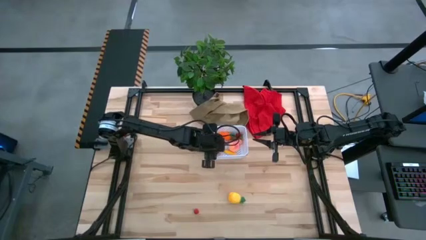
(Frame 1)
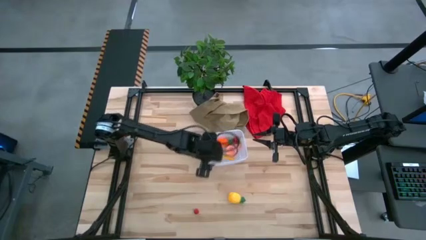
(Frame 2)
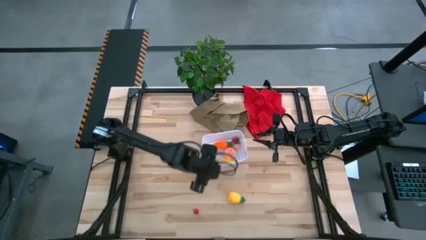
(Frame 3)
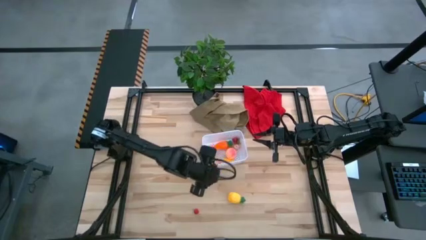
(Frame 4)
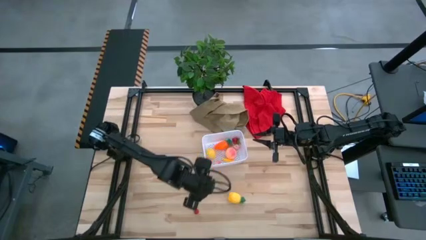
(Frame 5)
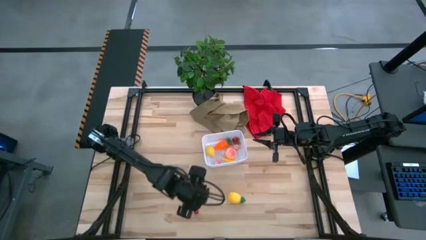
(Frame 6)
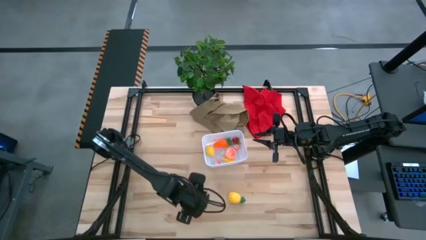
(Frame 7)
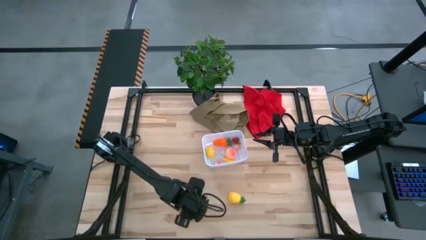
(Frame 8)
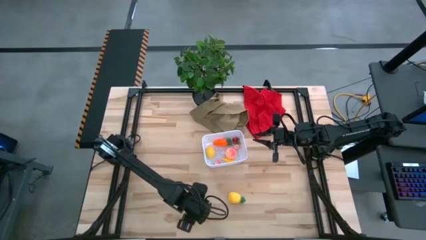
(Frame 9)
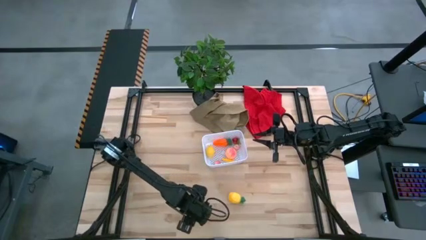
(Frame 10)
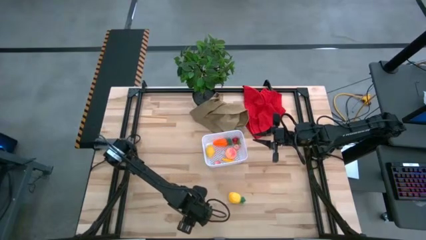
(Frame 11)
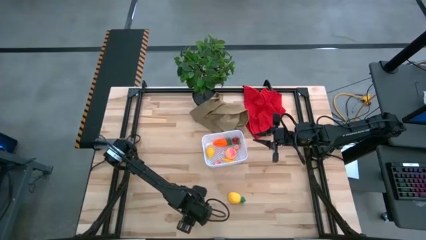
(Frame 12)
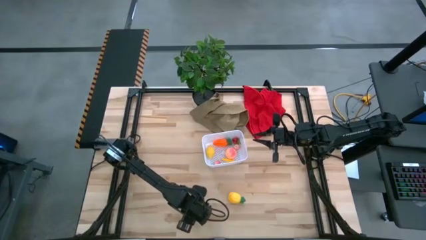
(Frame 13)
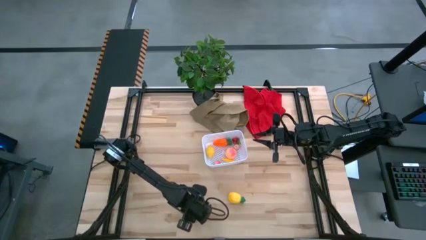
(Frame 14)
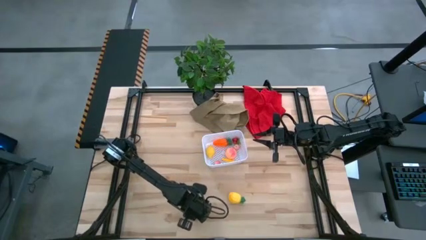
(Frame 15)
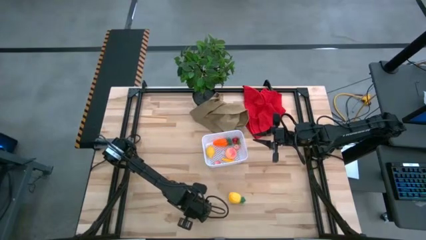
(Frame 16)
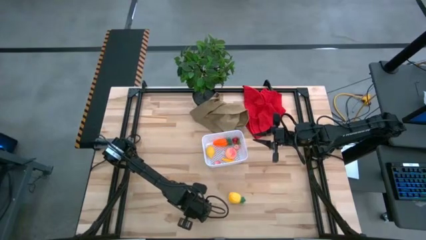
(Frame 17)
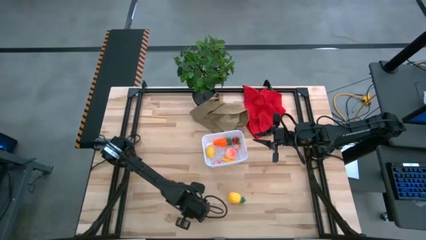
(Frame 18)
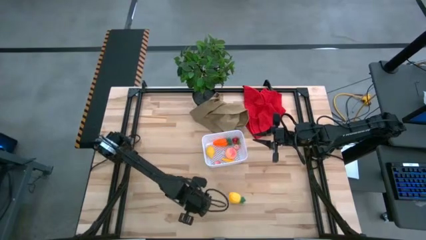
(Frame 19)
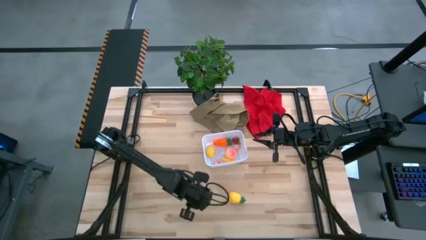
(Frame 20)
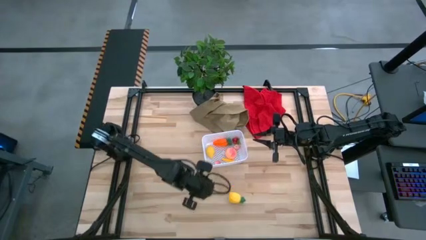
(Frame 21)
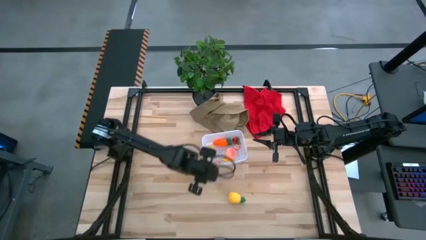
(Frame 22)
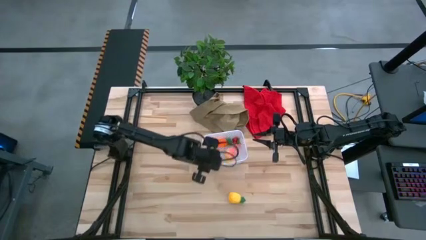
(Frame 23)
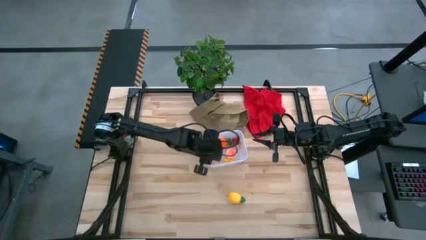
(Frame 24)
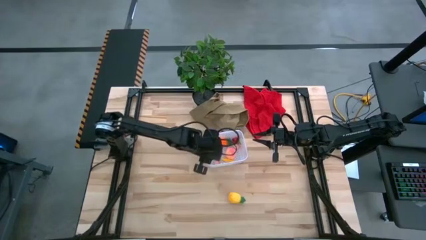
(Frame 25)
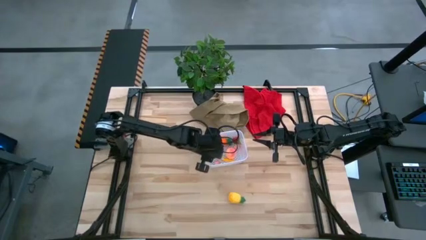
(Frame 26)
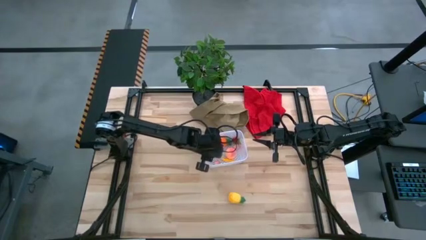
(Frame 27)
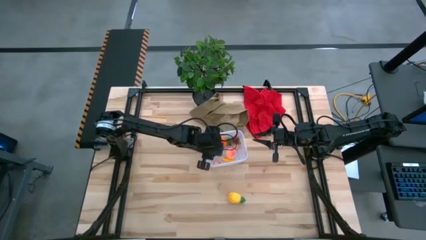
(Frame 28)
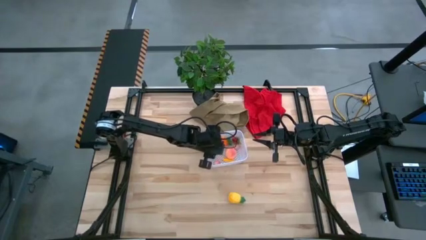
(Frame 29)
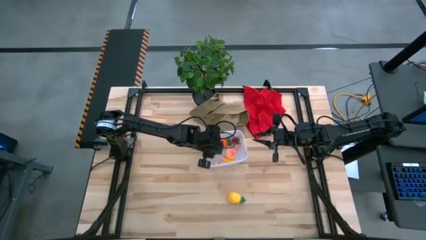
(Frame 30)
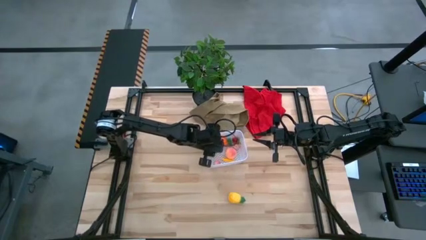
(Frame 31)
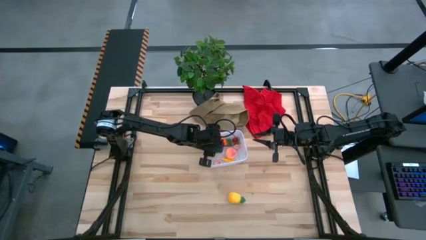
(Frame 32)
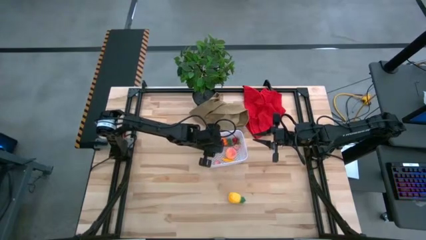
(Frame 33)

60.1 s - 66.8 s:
Task: Pick and placing Produce into tupperware
Put the raspberry into the bin

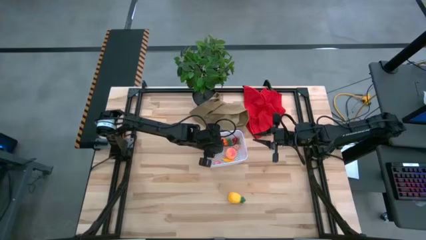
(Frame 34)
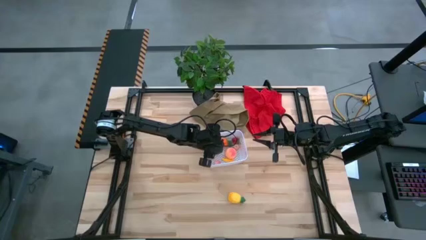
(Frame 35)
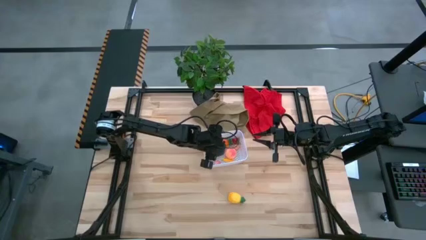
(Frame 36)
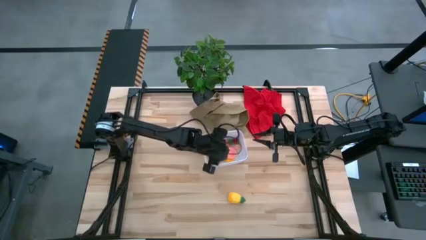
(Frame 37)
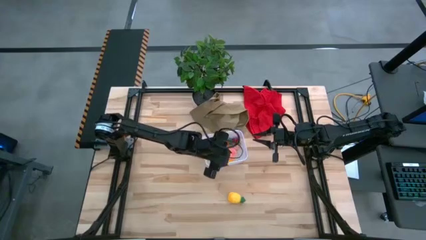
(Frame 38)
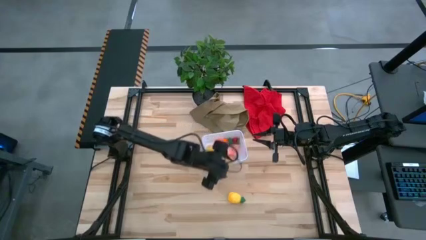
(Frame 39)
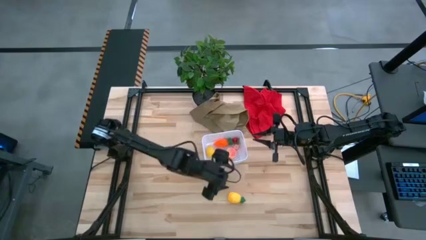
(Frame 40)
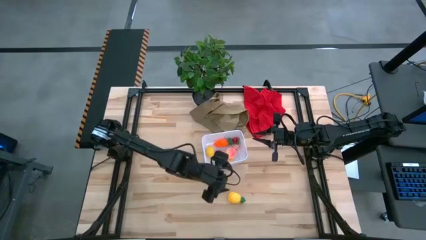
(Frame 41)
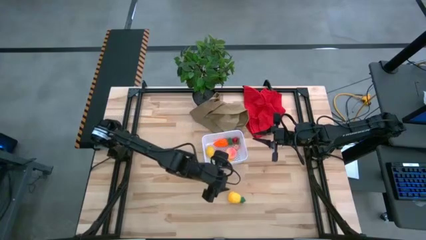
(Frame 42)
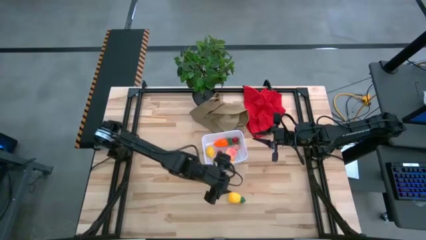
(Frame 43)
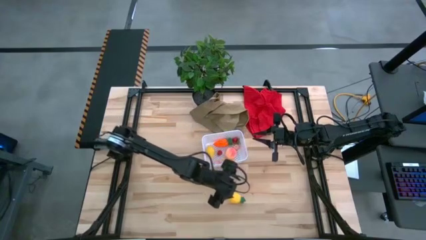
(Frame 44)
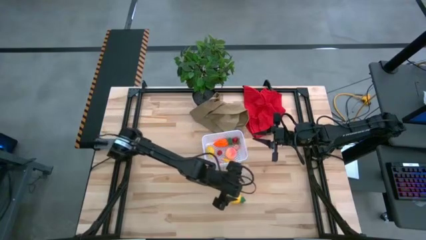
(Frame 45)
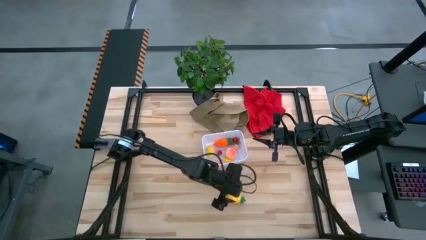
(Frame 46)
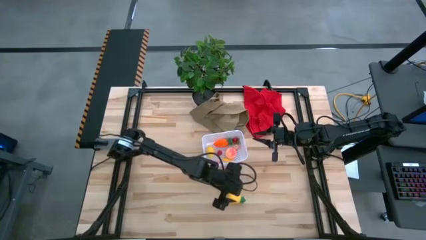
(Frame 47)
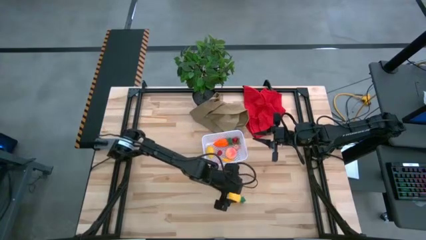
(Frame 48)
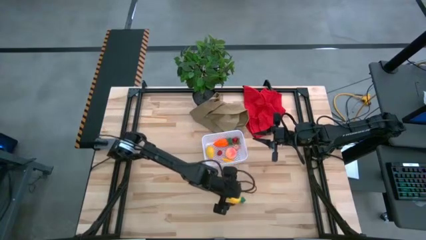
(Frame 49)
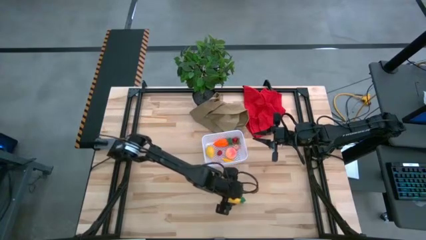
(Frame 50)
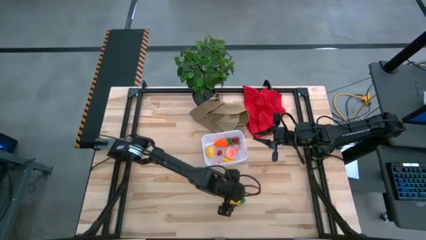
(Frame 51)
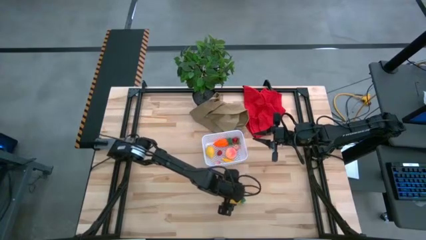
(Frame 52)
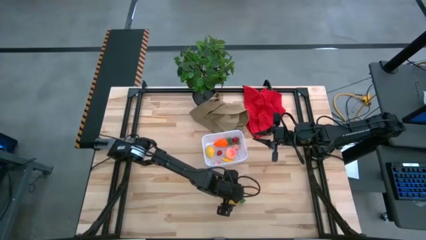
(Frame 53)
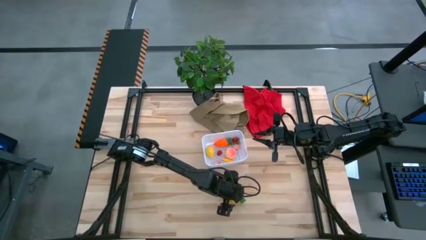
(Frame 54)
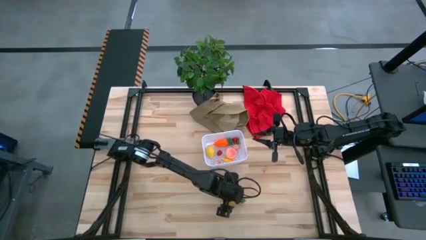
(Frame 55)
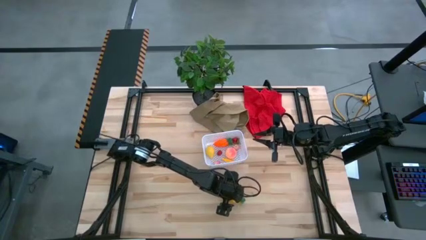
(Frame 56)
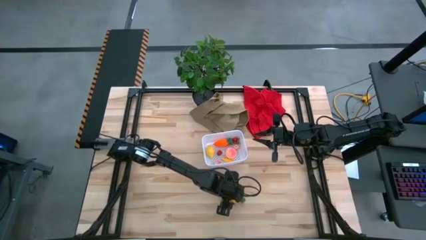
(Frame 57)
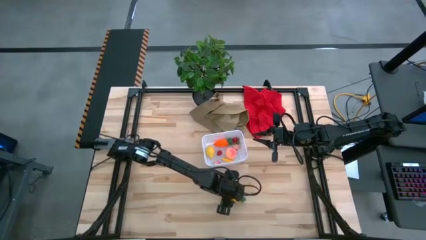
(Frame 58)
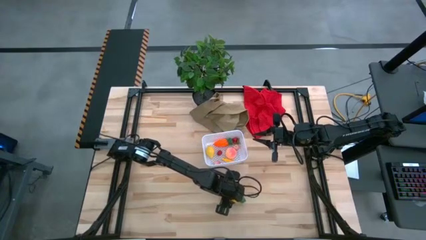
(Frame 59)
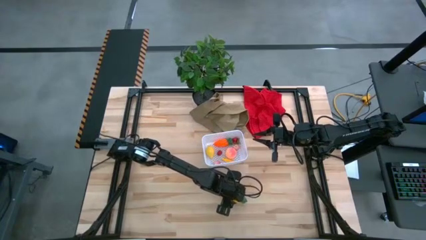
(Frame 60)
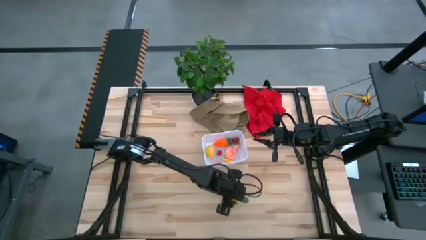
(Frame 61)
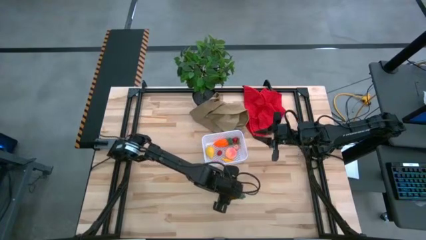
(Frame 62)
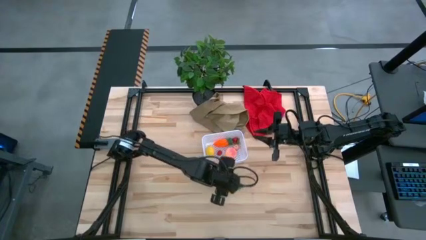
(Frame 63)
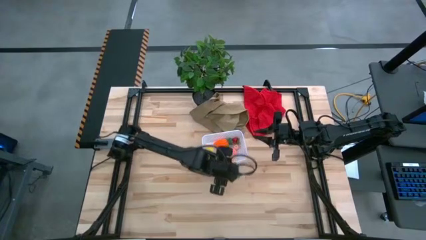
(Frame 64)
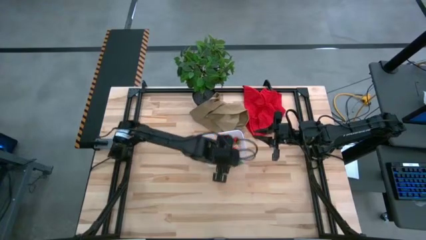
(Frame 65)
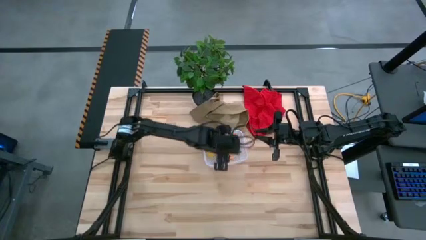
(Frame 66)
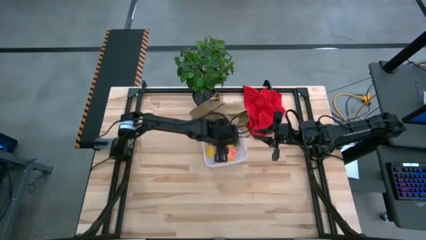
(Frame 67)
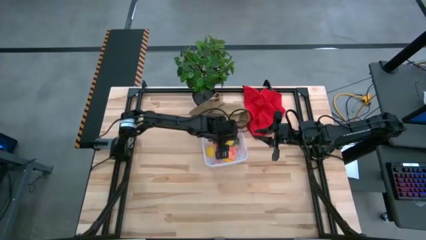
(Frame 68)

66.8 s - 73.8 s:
Put the pineapple into the bin

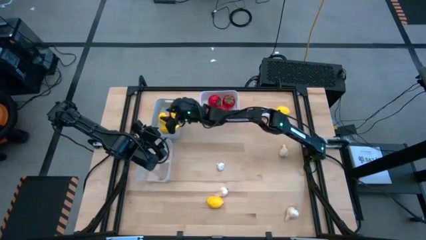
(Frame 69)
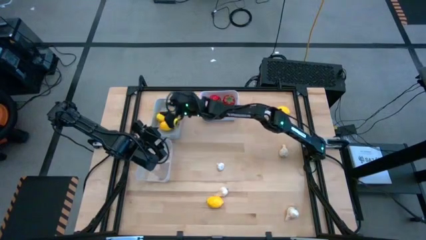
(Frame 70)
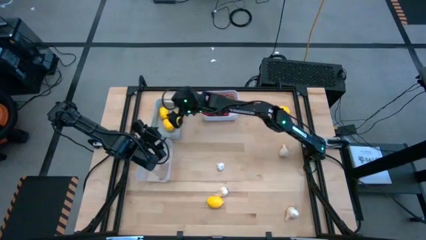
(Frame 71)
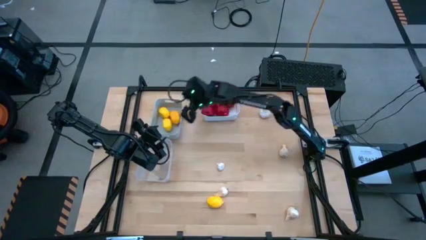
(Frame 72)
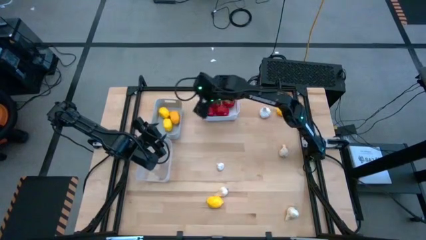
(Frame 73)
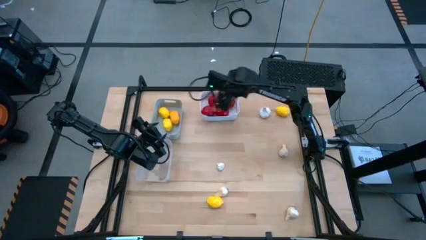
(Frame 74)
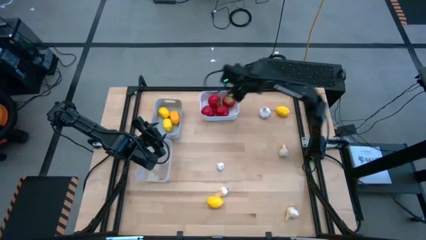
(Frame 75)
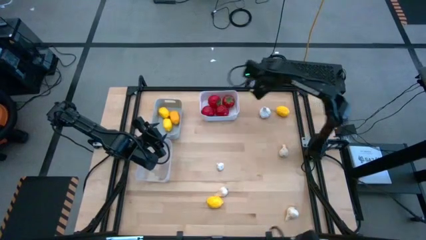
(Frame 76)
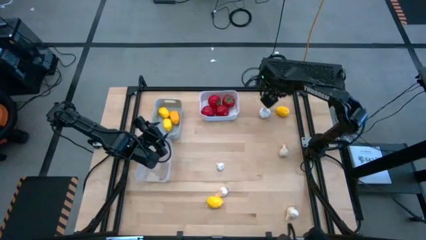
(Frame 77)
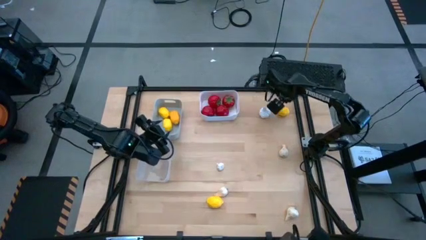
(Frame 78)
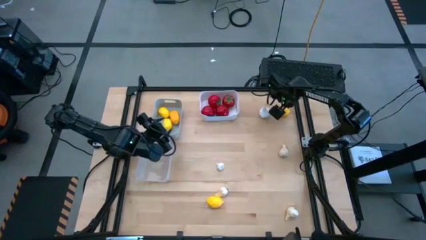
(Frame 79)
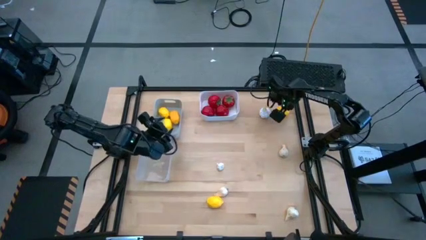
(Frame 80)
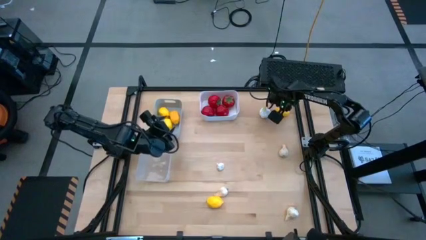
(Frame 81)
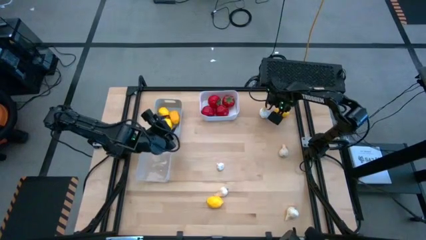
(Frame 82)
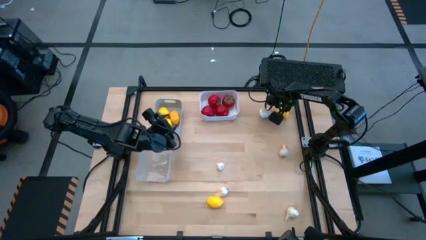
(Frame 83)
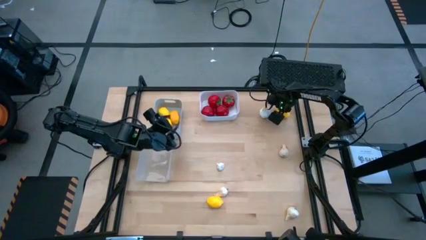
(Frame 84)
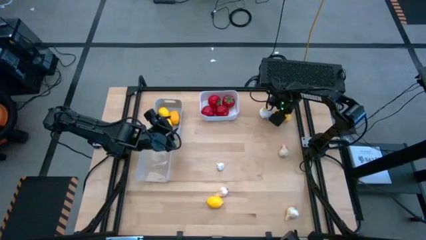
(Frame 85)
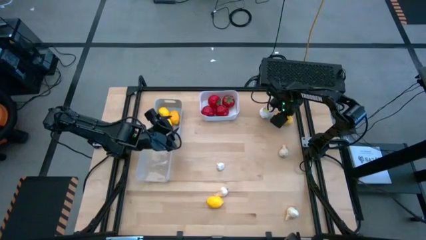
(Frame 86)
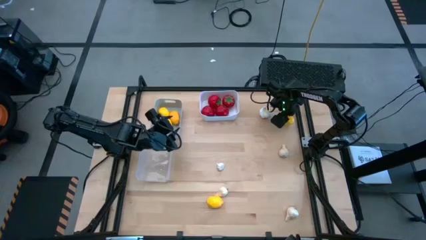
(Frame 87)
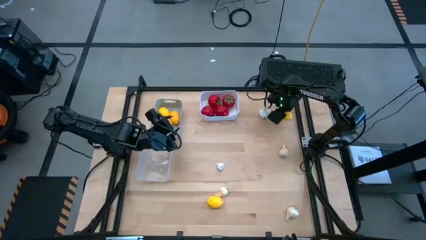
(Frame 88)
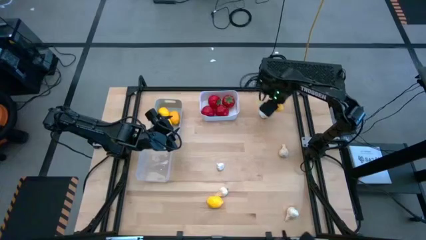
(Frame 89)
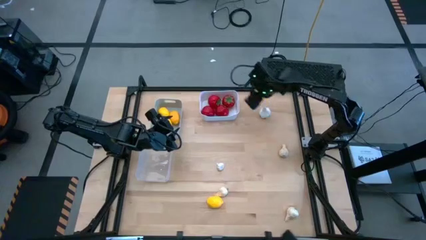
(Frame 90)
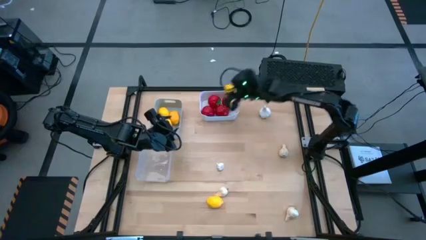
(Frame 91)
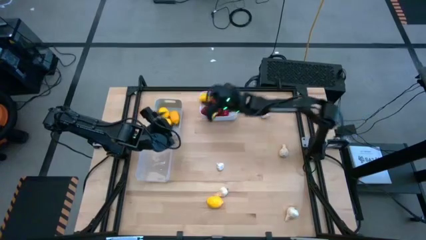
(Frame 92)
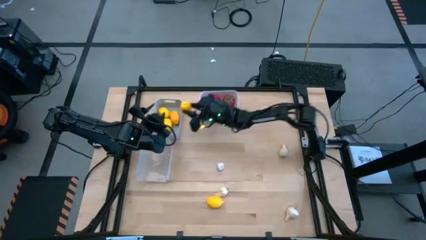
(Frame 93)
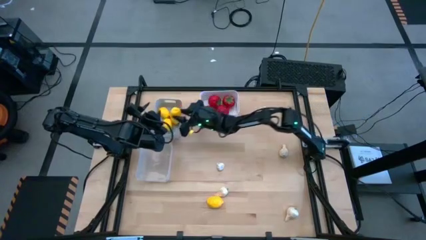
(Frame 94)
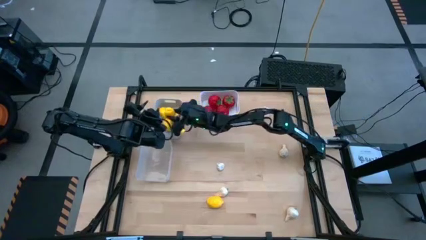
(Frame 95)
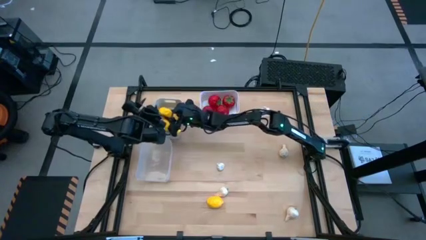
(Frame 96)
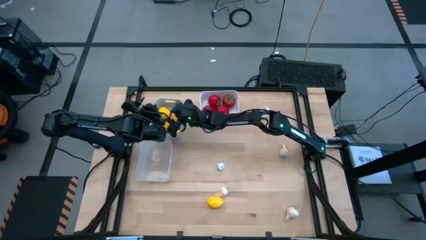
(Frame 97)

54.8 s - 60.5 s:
Task: Sort produce into baskets
Put the yellow lemon into the gray bin
